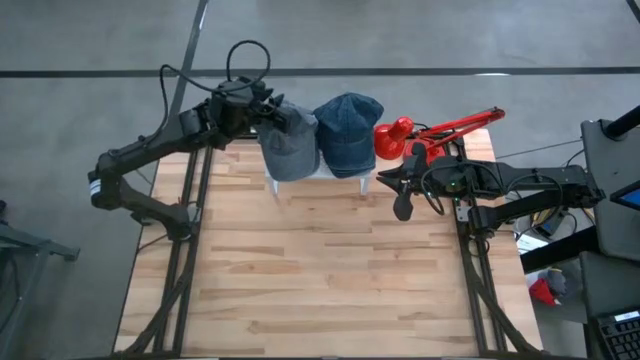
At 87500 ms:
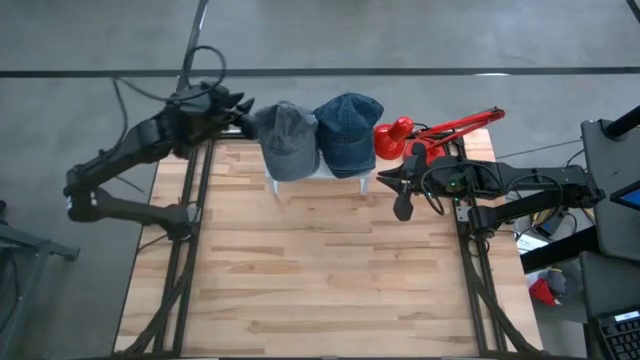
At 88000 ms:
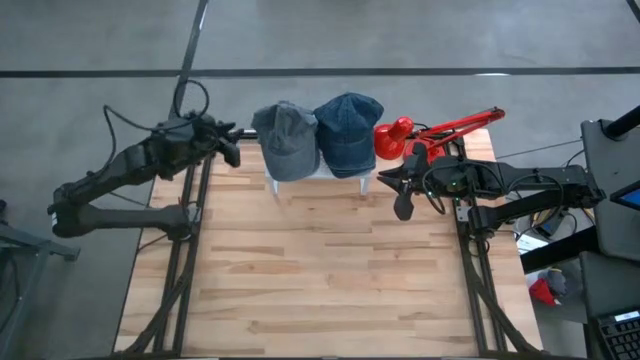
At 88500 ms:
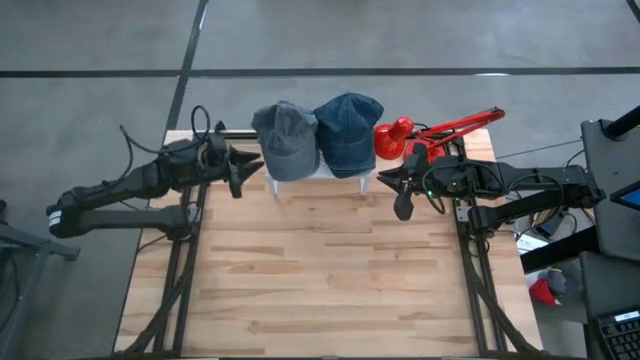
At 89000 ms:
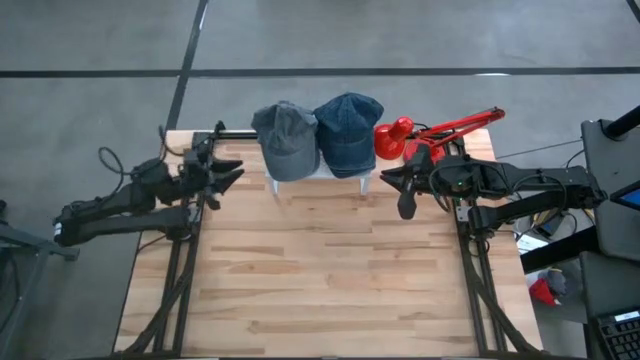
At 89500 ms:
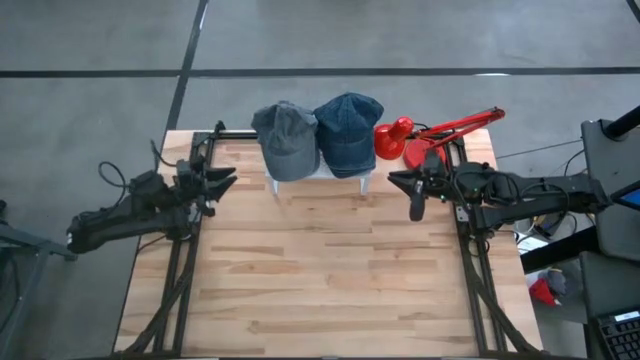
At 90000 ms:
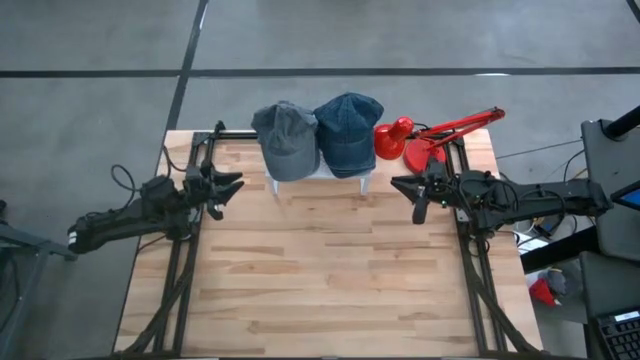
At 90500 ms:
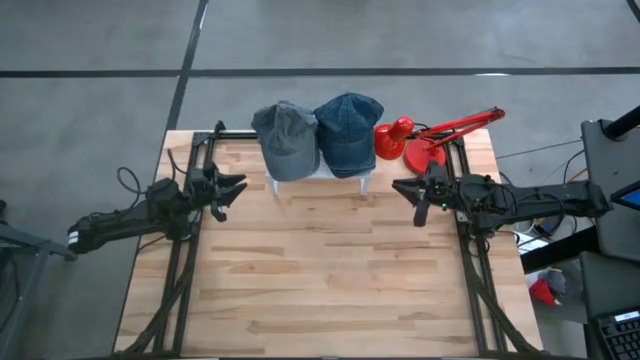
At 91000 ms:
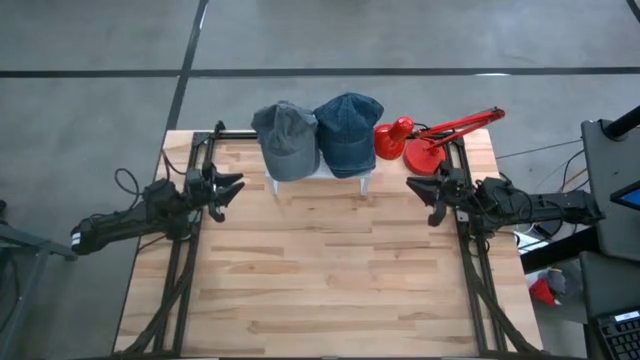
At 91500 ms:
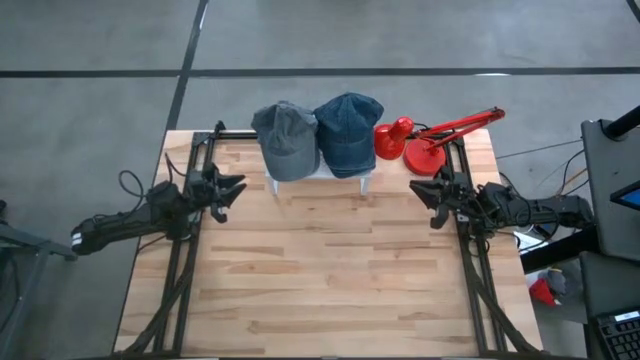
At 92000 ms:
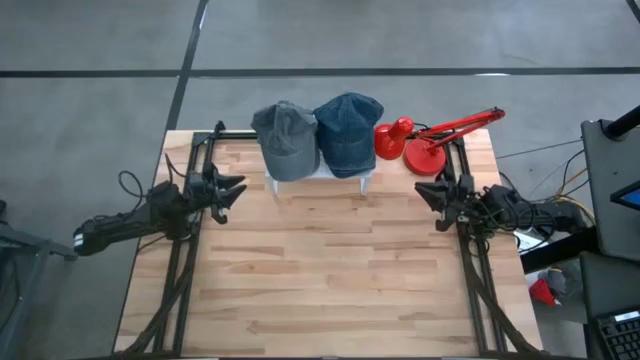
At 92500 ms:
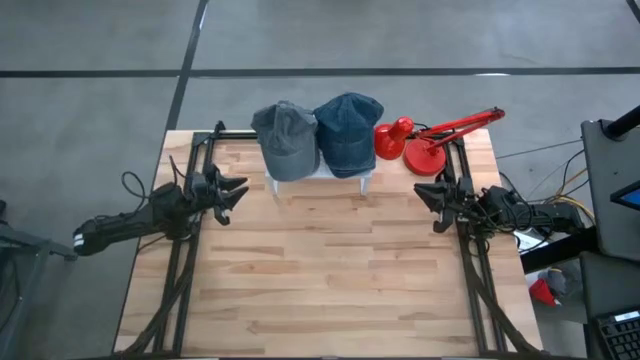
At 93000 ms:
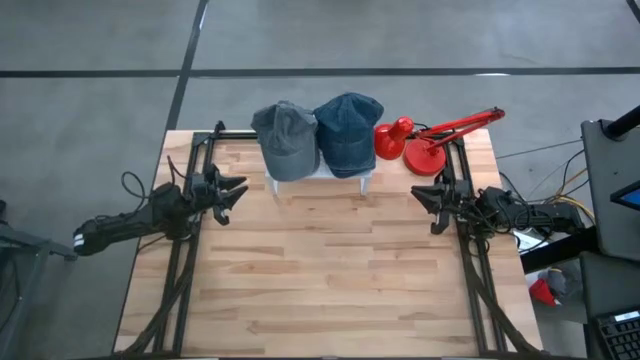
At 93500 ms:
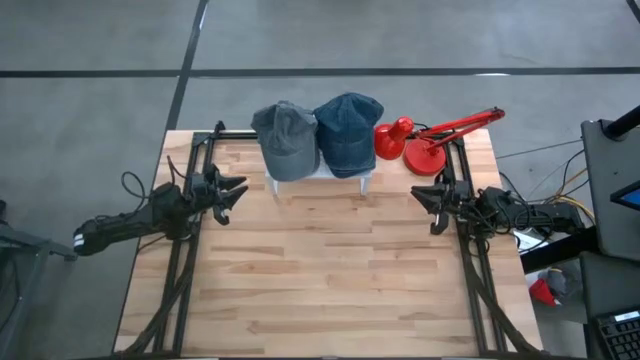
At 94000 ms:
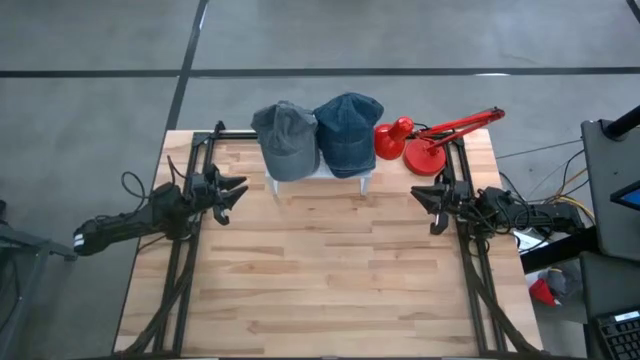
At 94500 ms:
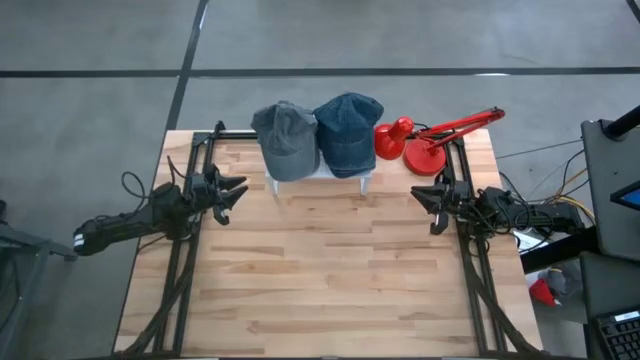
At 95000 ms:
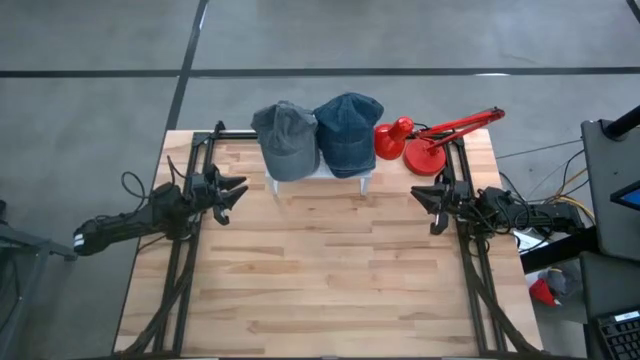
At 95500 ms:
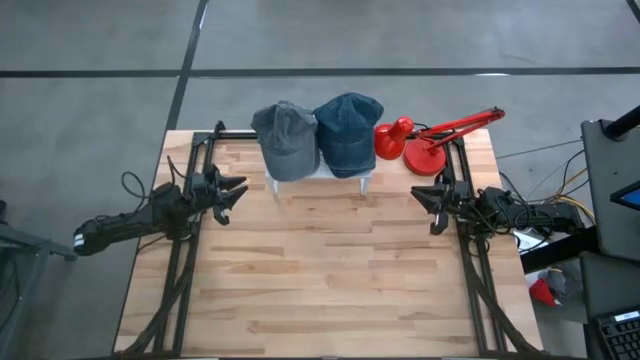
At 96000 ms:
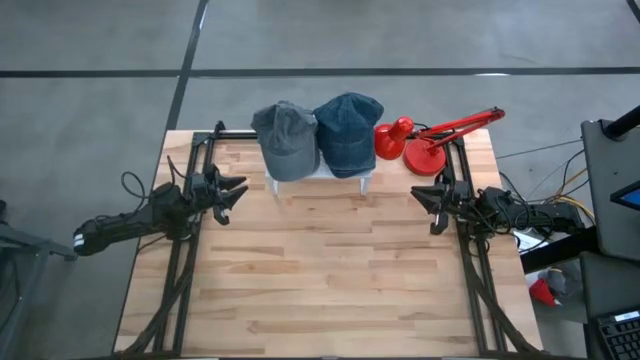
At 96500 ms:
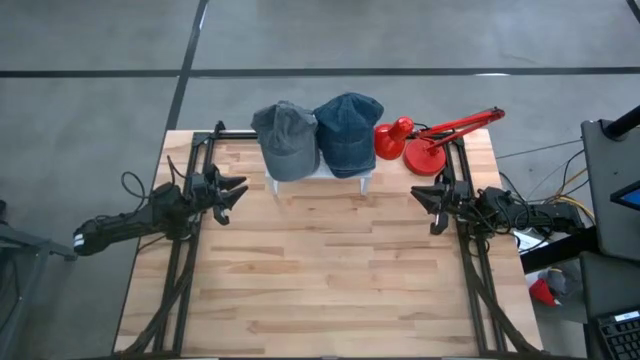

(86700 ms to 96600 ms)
Task: Pick & Place hat
Return to Home Position

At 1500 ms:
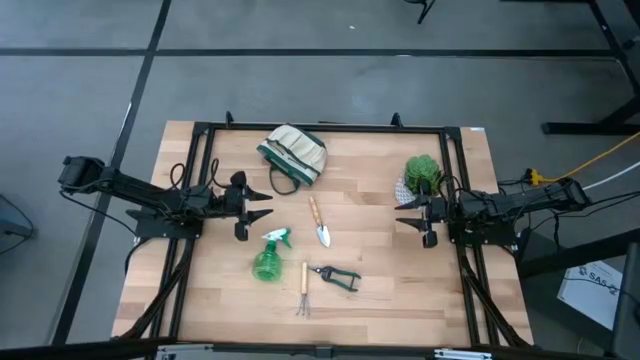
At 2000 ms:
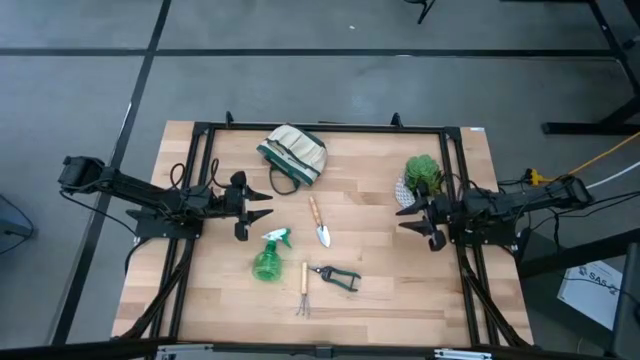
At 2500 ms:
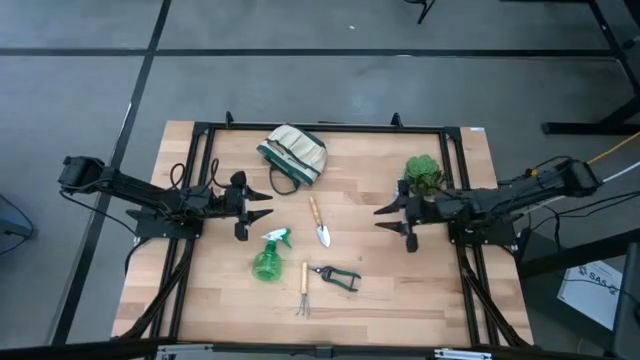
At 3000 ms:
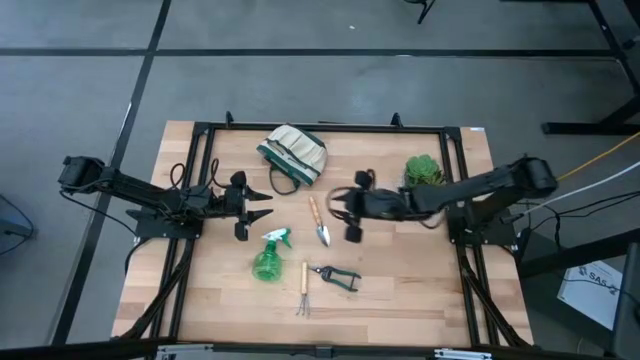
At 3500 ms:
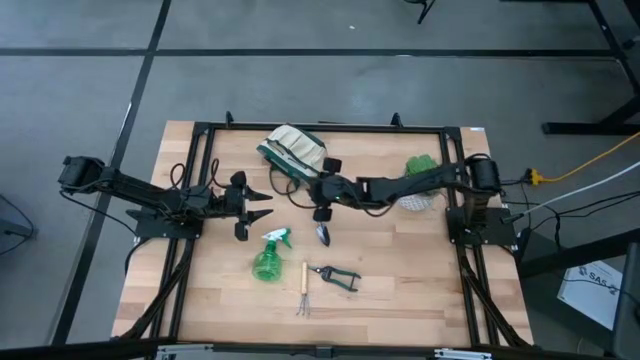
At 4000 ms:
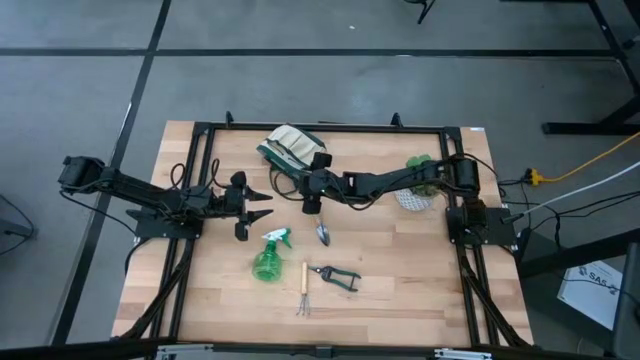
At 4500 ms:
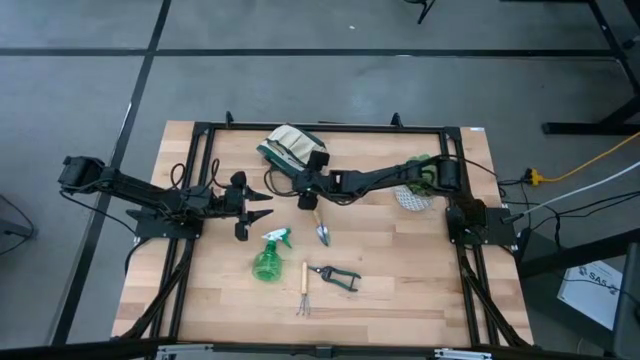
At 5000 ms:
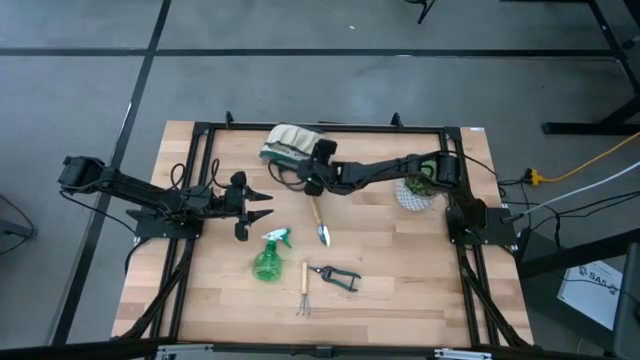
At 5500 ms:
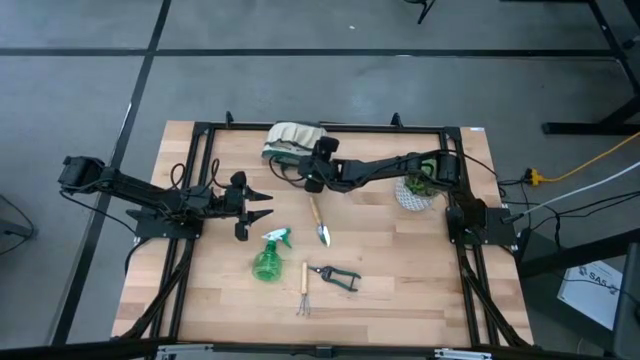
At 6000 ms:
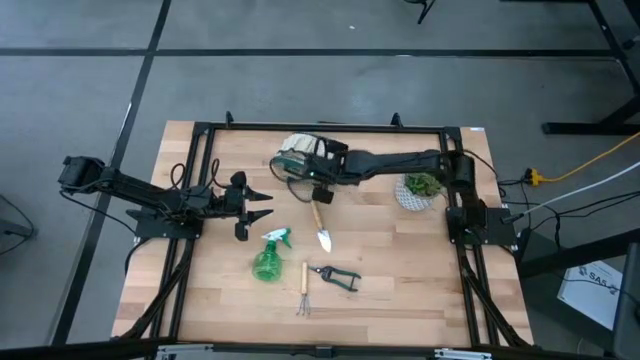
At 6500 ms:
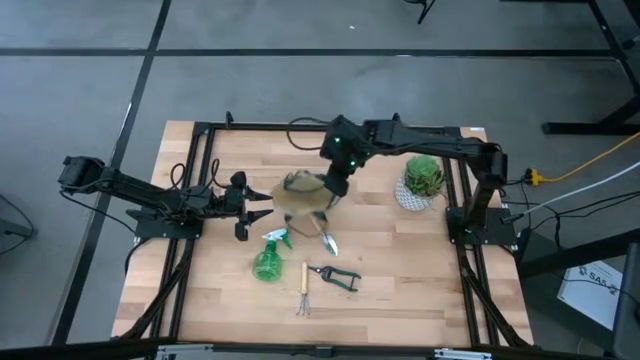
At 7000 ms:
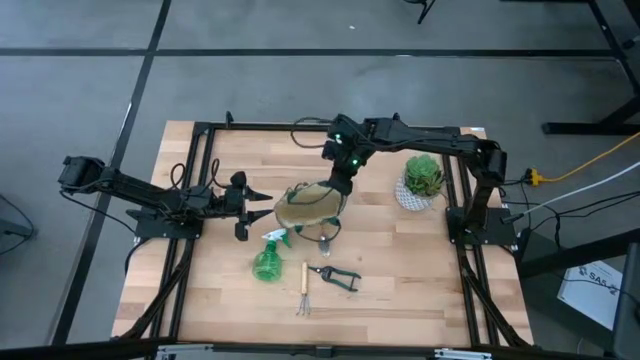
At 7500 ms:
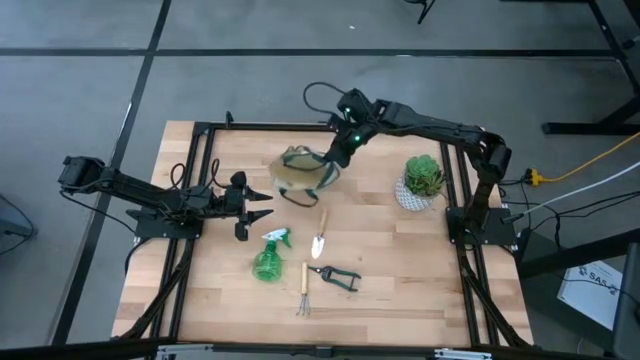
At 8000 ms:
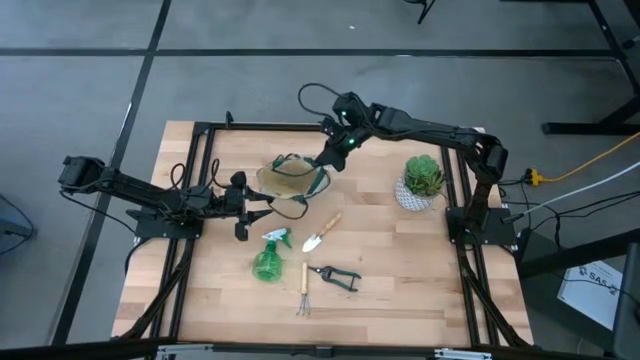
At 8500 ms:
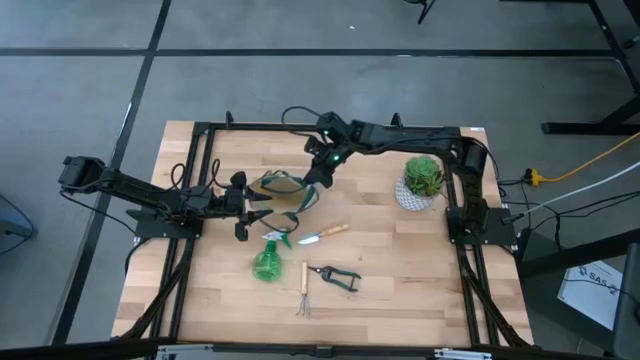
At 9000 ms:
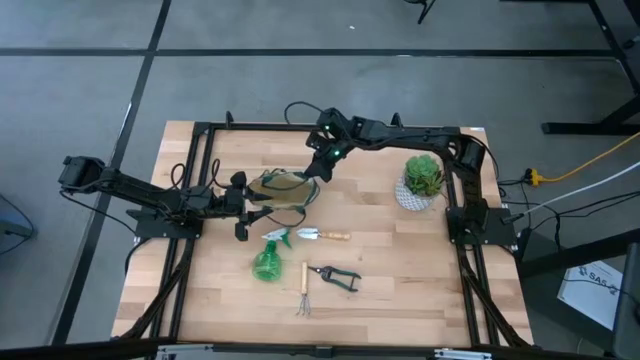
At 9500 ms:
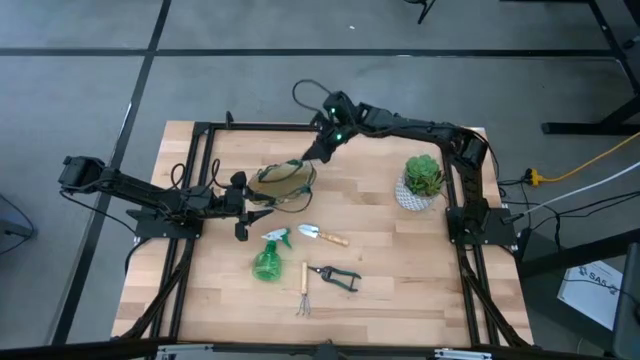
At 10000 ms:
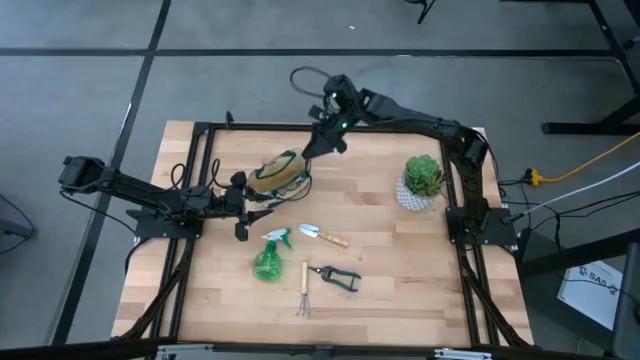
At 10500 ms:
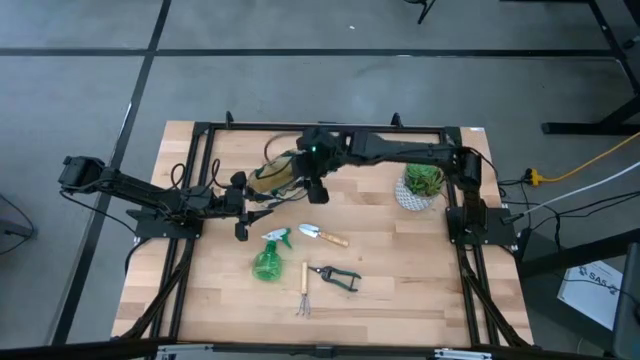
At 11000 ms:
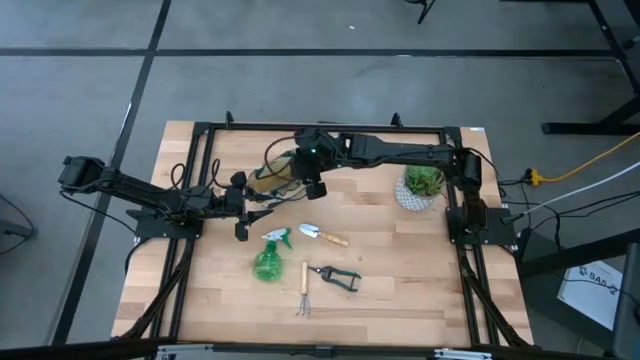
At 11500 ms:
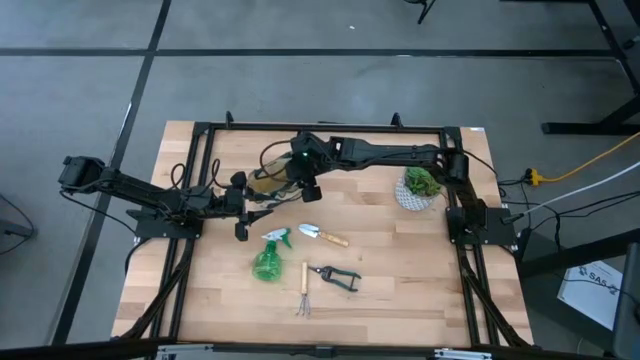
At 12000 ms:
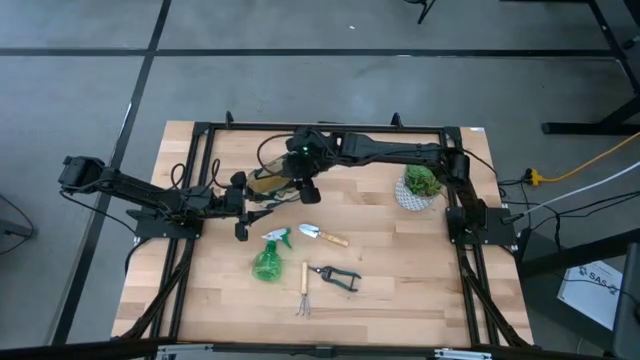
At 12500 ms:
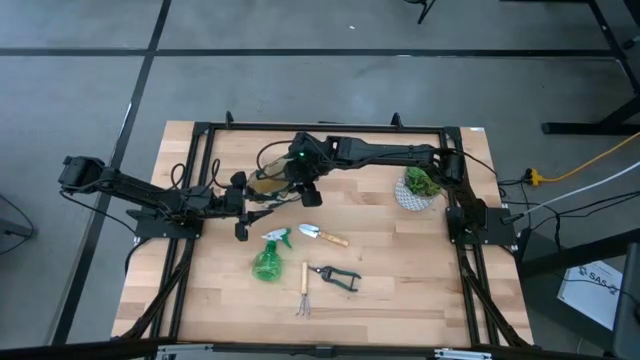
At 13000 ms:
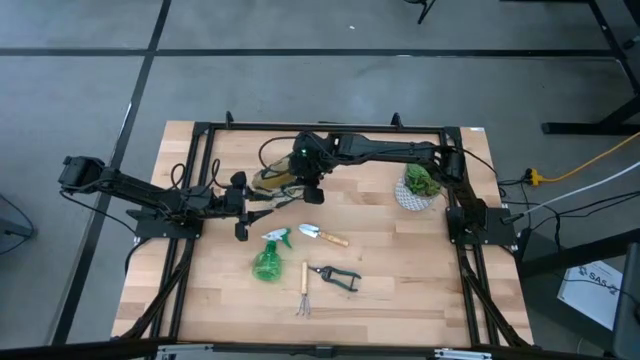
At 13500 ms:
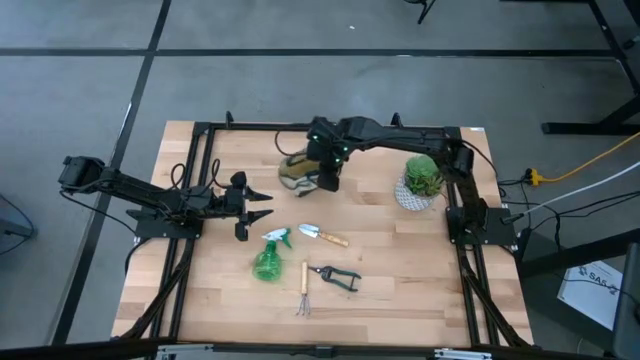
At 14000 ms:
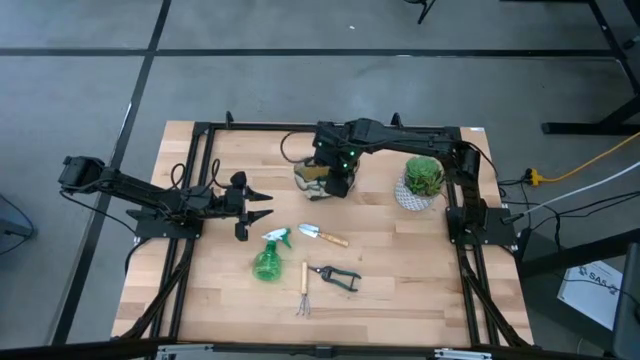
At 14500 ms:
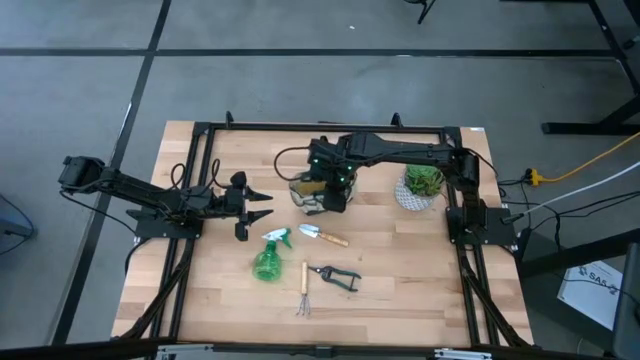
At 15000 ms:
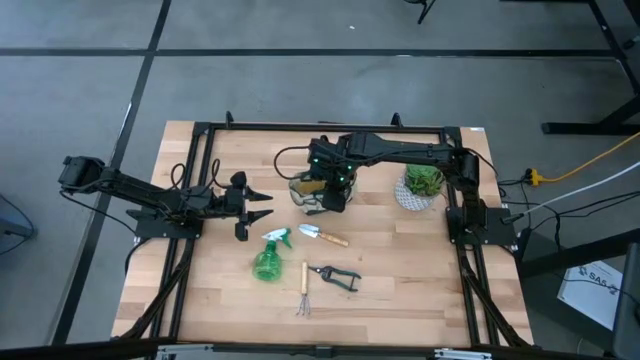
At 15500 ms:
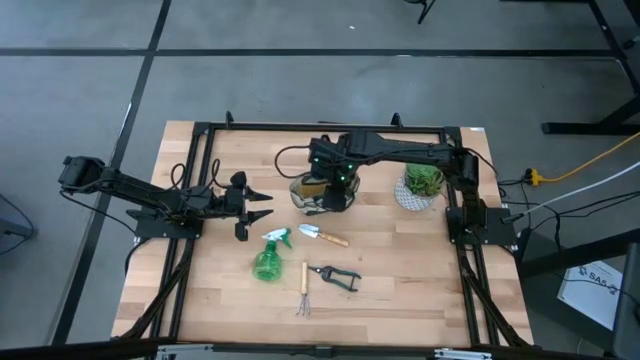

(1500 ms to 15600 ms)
Task: Pick & Place Garden tools in Gardening bag
Prepare the gardening bag
